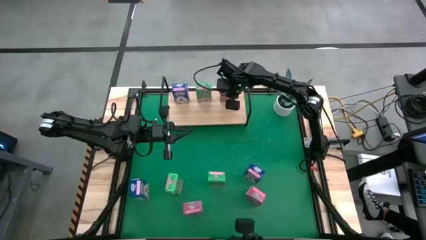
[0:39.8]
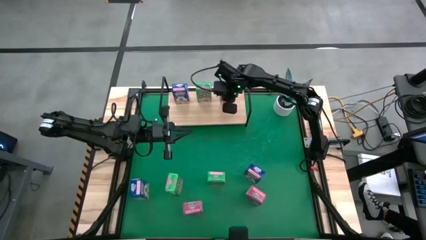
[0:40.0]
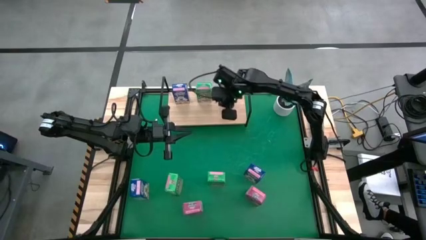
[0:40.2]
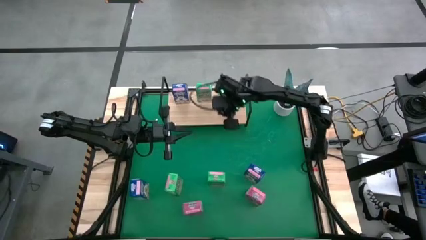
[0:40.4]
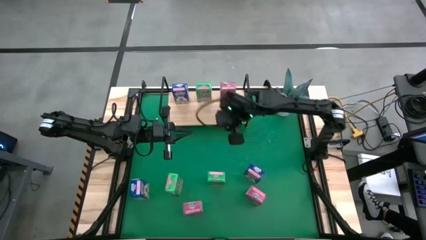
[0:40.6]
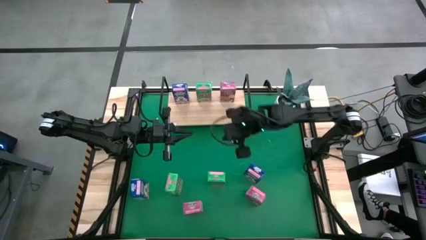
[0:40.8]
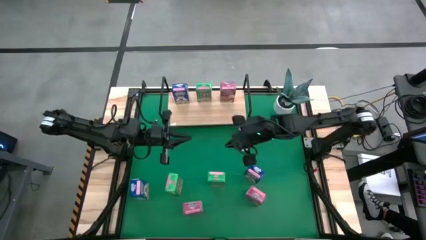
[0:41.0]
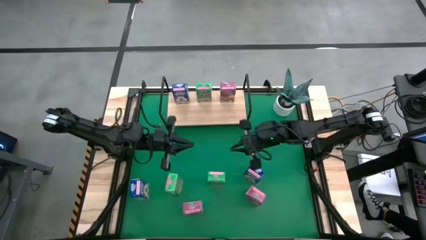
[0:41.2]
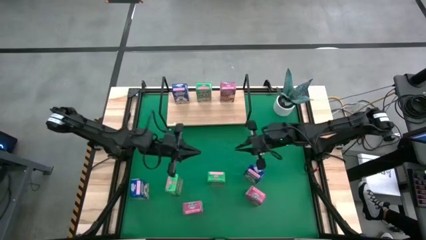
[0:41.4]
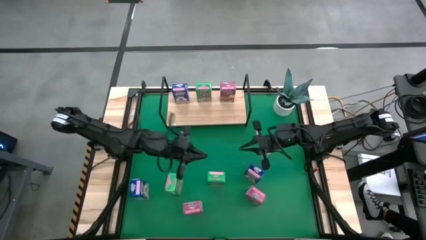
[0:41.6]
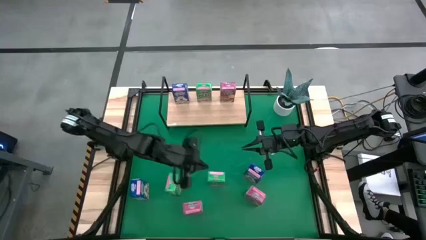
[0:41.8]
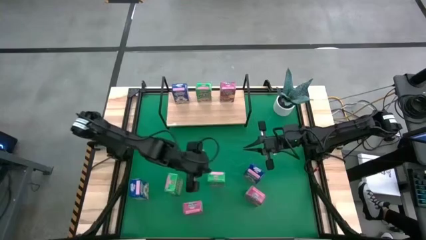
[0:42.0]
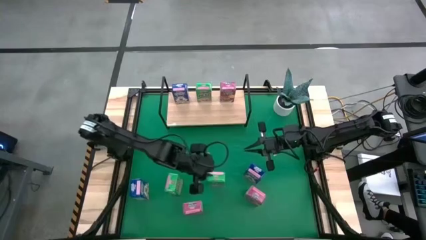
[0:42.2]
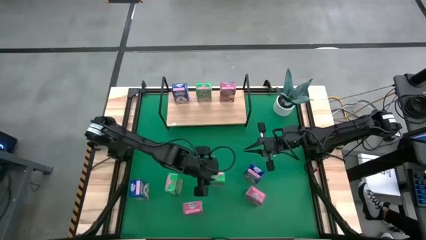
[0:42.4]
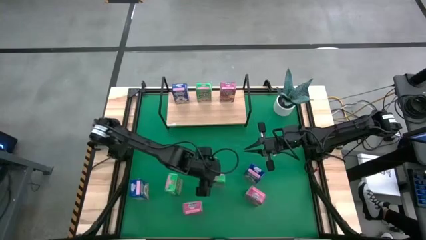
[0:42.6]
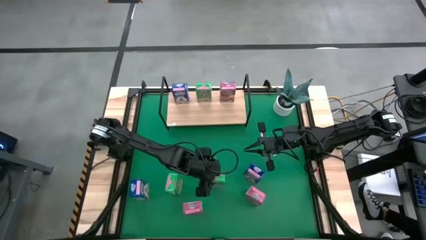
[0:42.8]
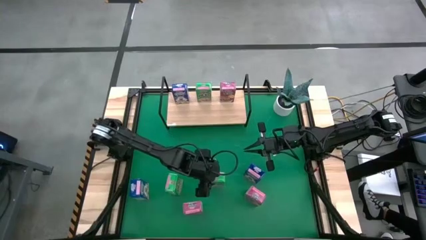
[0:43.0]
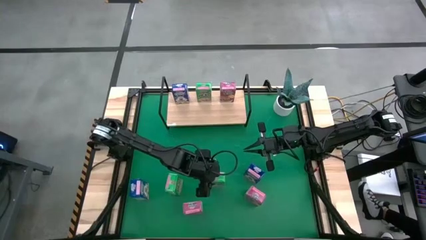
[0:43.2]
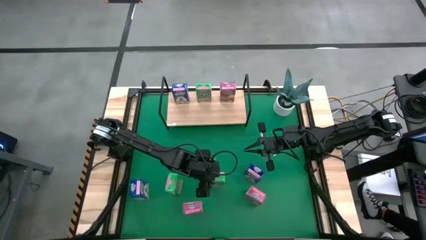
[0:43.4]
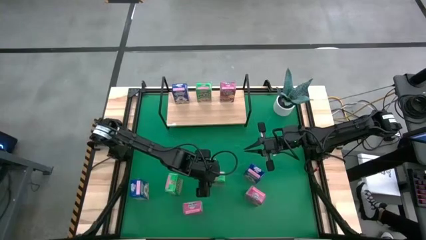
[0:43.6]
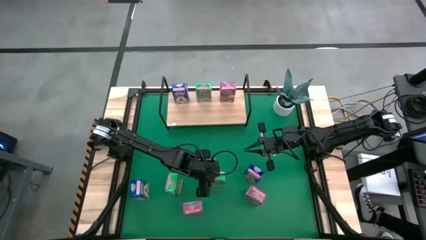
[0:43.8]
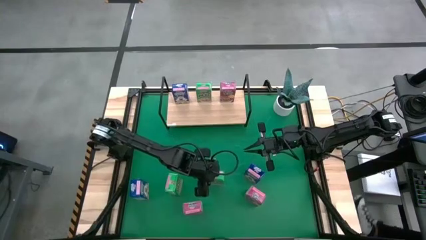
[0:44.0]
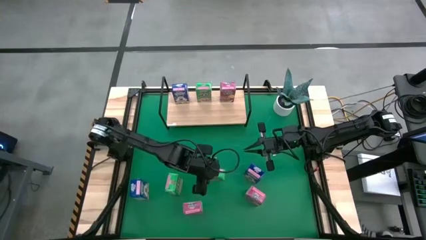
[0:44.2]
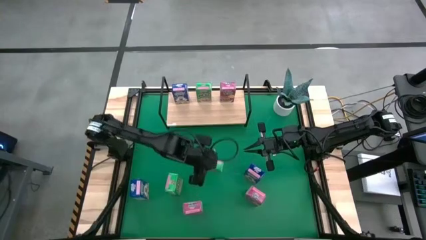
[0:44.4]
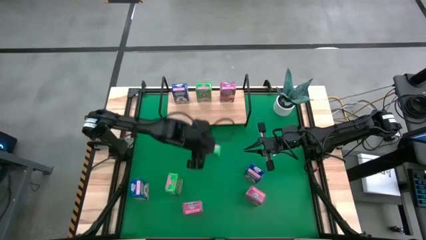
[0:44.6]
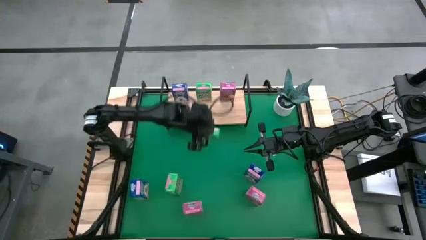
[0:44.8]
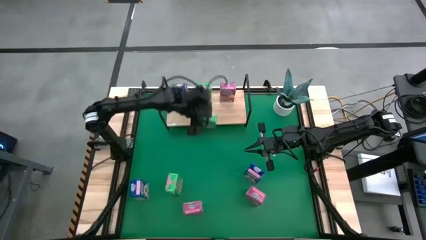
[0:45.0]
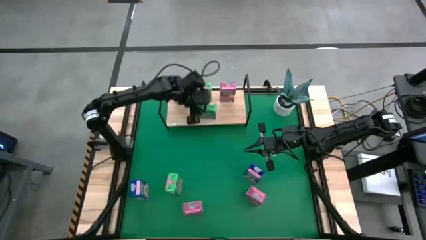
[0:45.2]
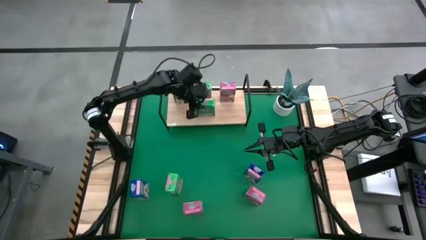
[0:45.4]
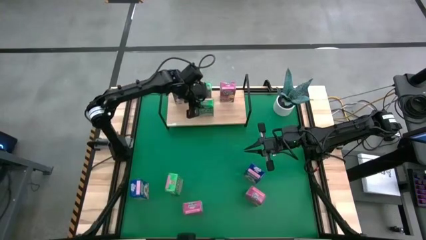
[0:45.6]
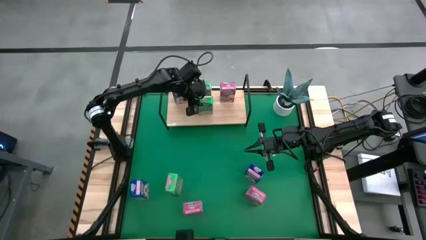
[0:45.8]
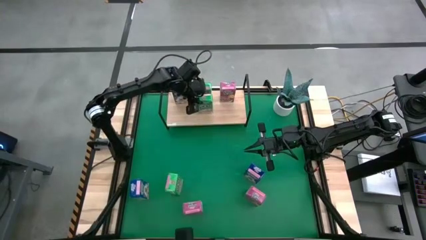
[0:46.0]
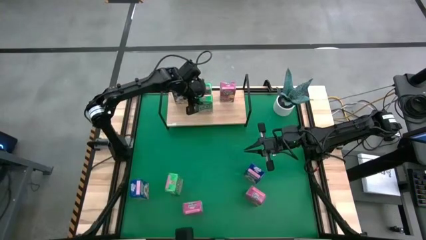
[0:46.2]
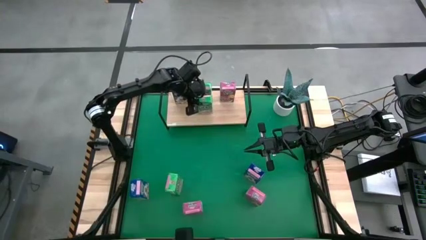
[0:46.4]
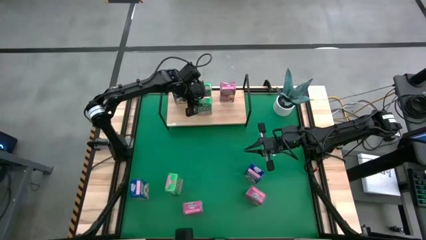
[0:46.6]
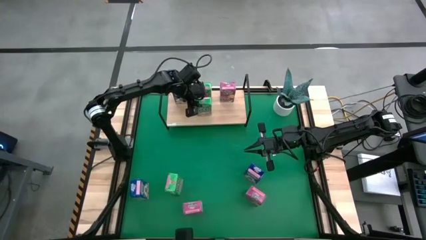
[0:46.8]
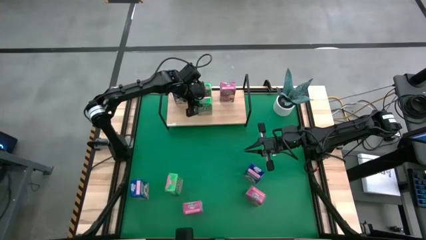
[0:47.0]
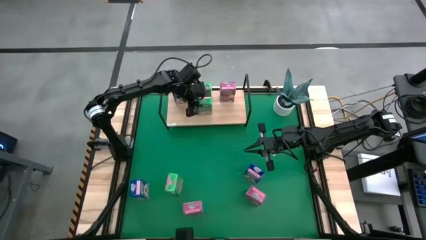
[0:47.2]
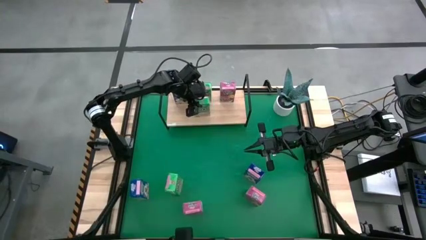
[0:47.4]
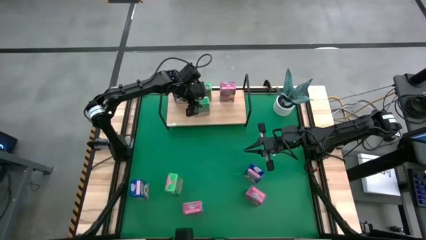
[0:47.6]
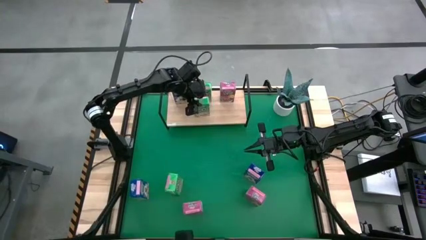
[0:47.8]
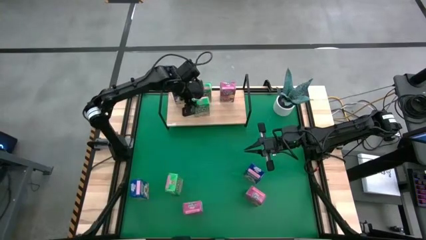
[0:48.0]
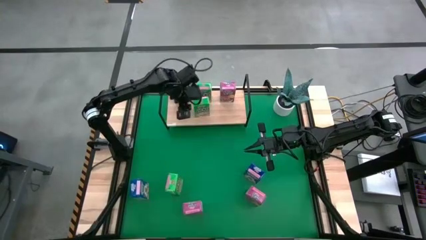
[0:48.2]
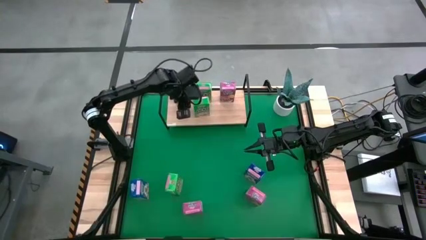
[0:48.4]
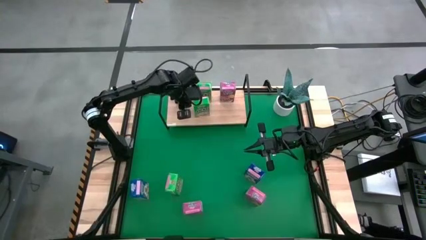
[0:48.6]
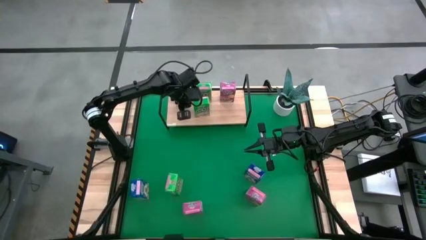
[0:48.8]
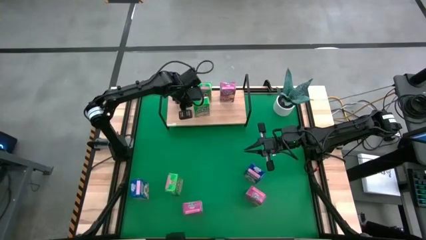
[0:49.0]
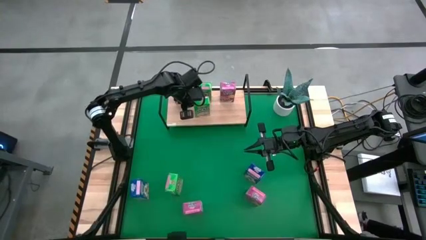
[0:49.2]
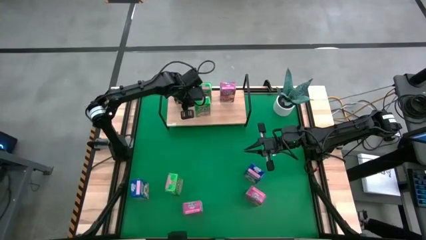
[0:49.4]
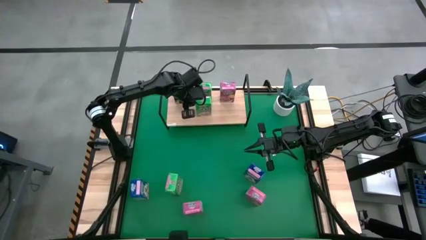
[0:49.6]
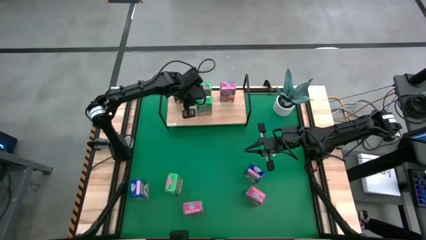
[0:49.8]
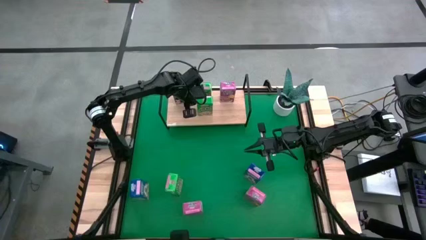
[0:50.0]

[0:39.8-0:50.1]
Task: Stack cereal on shelf
Put the right green cereal box aligned with the other green cereal box on the shelf

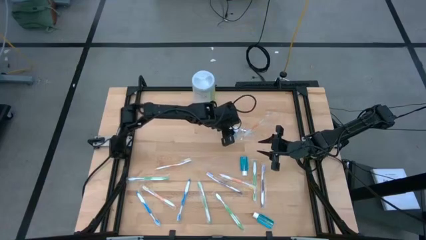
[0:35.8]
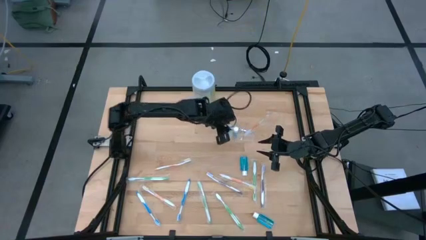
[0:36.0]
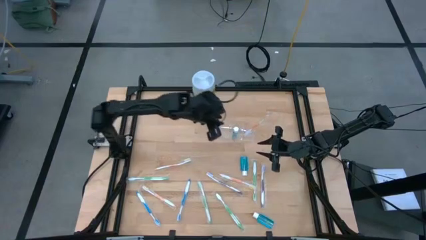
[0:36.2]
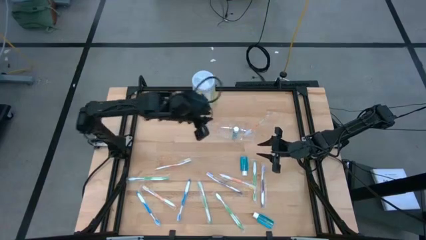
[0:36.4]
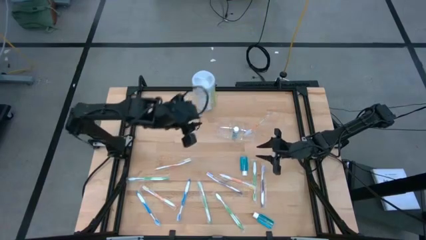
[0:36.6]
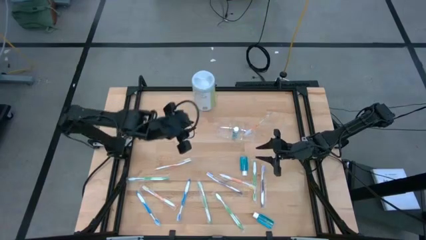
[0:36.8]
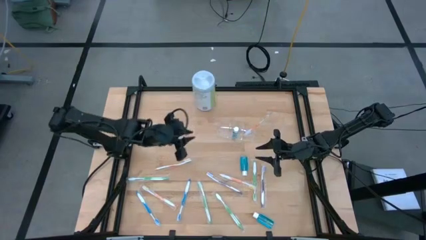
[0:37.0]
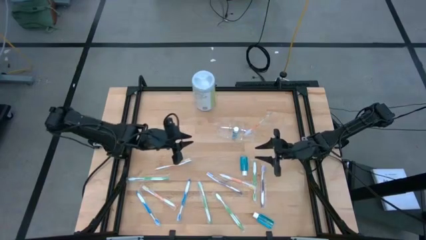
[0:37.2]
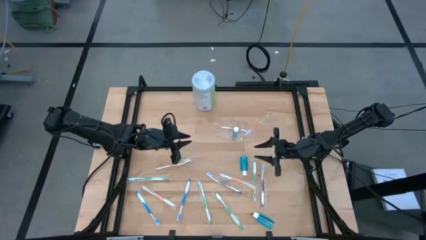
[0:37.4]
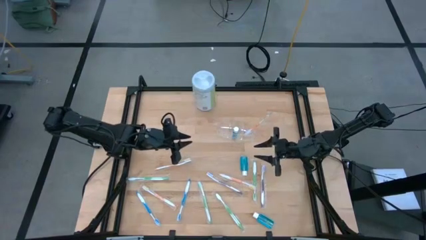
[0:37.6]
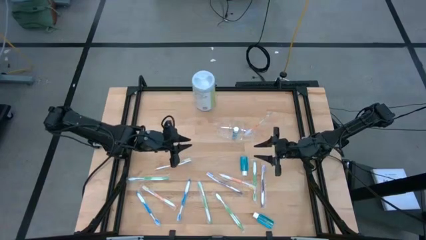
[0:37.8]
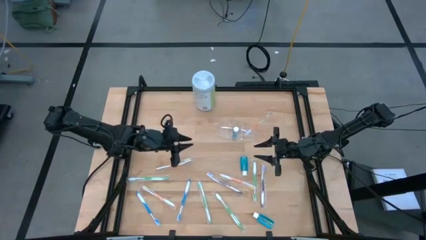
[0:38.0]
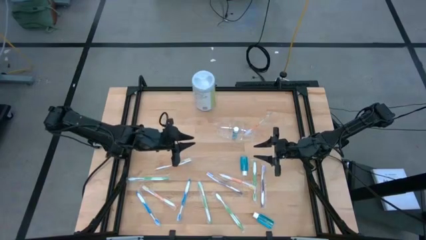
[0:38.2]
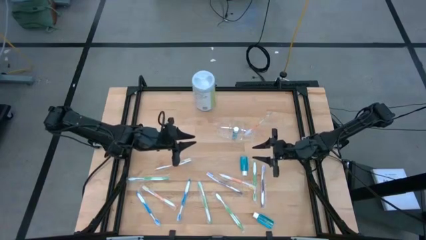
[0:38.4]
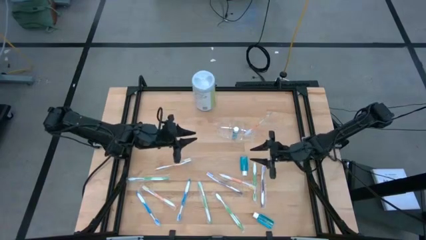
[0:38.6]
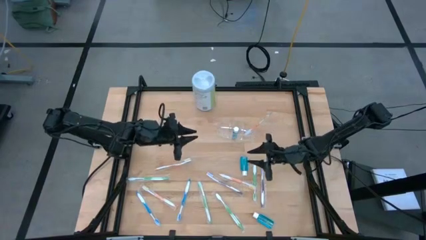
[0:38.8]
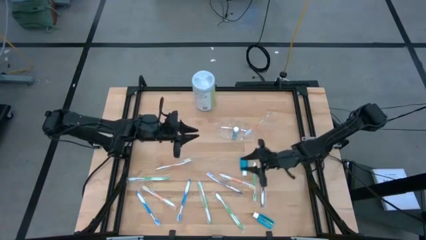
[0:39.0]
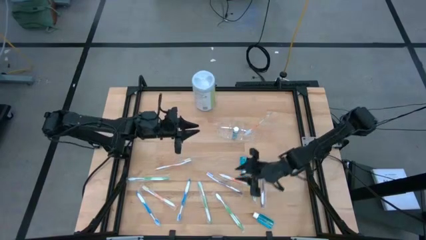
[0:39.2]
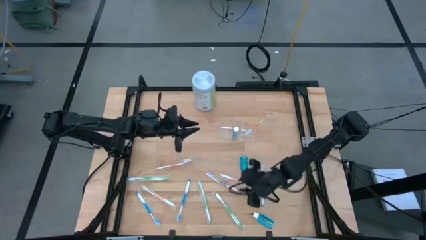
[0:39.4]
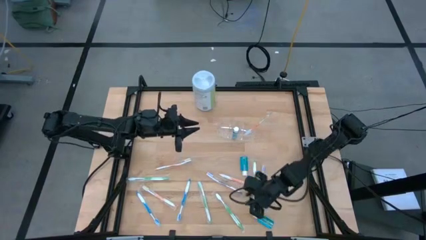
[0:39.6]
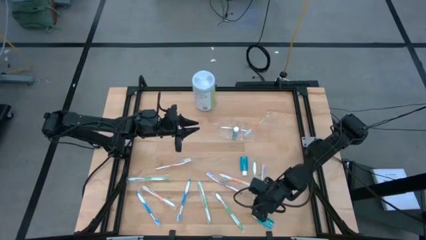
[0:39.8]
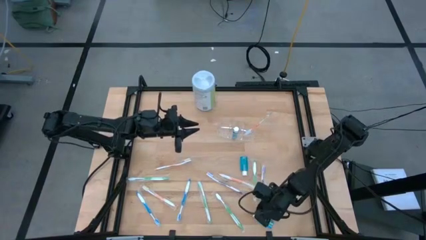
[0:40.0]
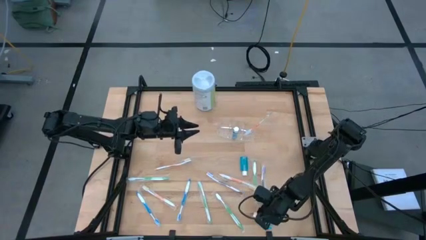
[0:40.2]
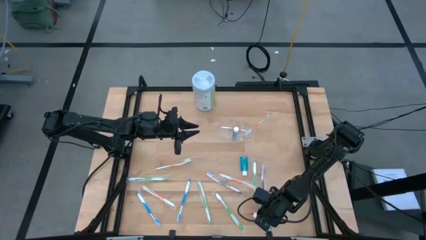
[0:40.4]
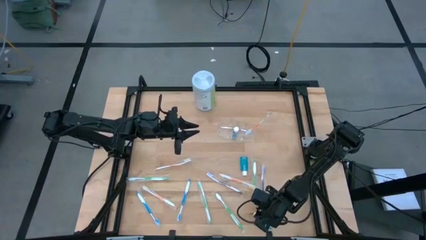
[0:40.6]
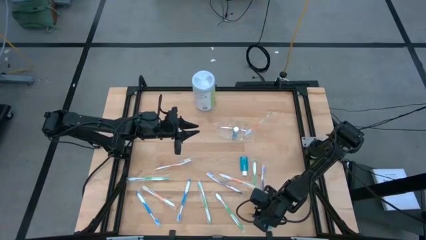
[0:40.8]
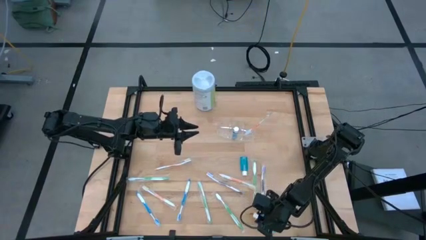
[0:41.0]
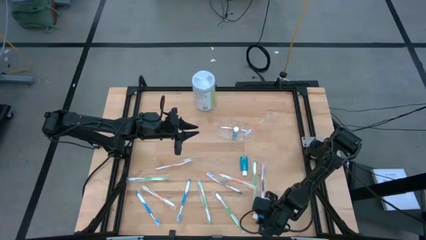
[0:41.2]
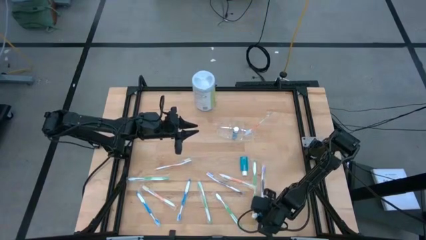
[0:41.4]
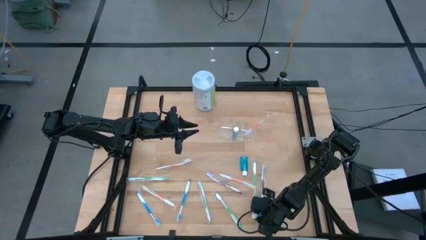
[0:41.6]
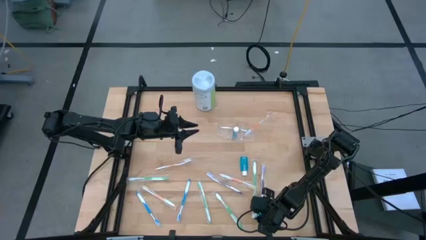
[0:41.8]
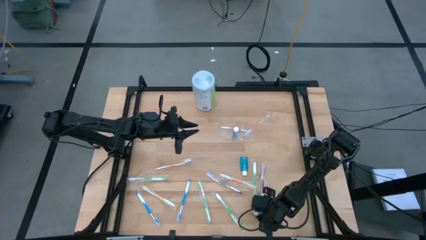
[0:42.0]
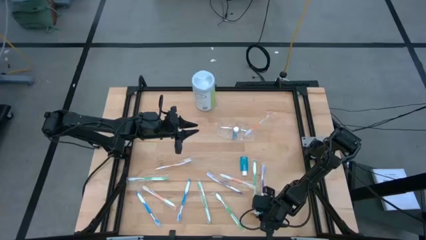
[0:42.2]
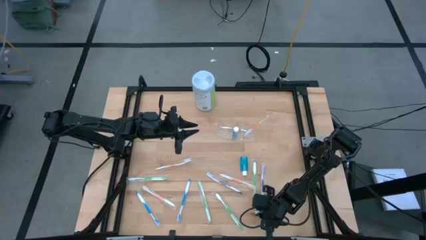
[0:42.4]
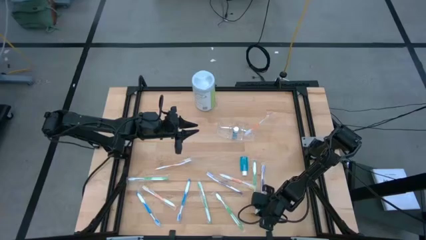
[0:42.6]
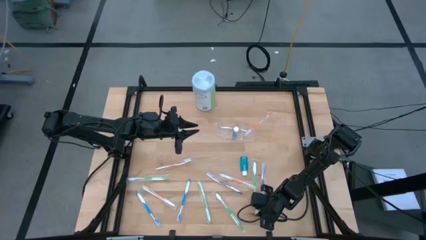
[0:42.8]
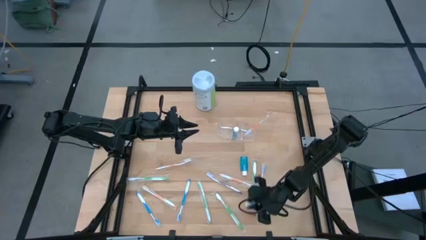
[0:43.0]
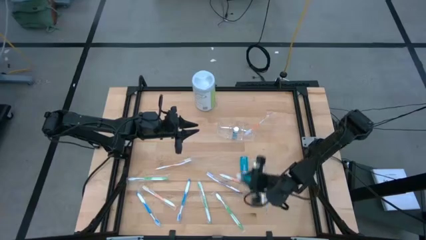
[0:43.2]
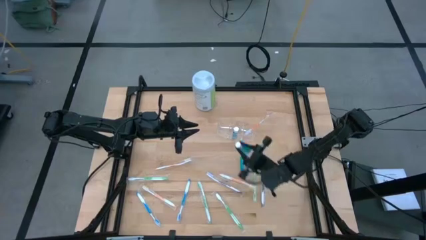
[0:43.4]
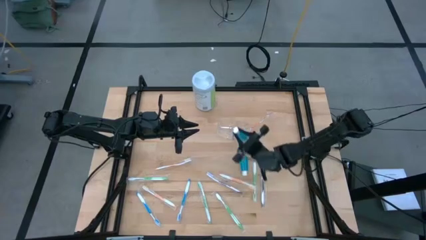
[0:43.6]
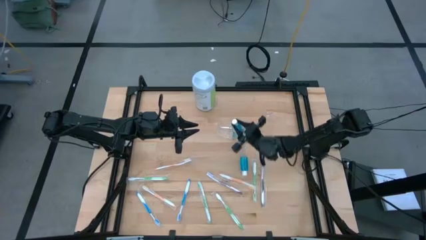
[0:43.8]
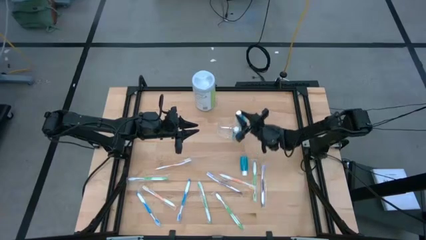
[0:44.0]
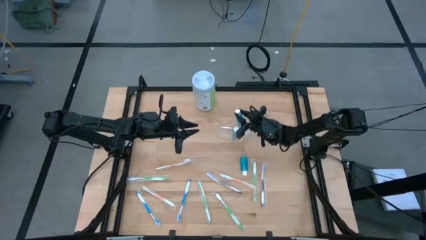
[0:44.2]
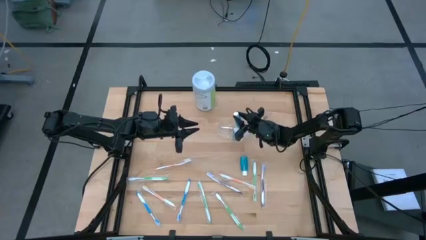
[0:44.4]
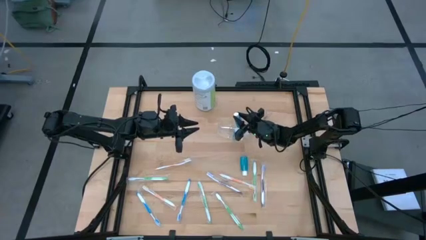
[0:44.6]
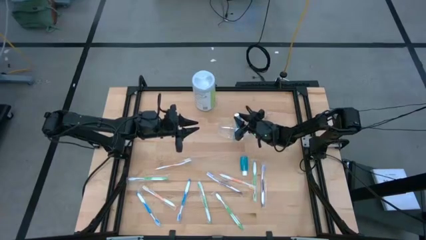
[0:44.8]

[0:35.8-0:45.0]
Task: Pick & Place toothbrushing station
Put the blue mouthwash into the transparent organizer
